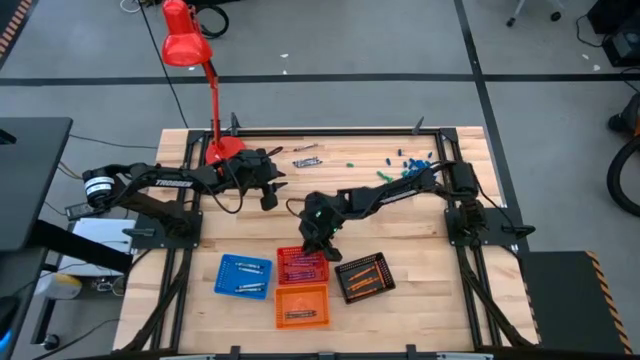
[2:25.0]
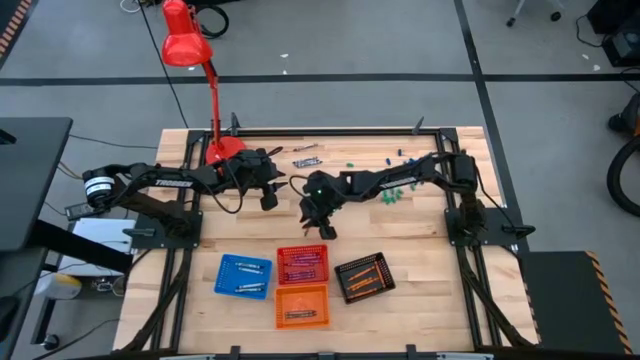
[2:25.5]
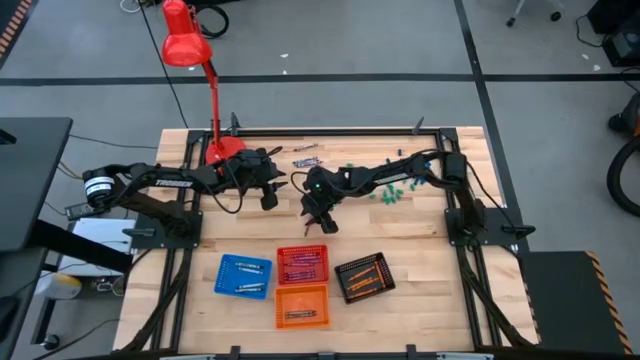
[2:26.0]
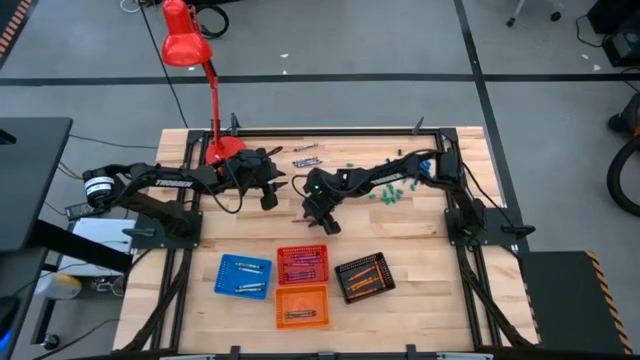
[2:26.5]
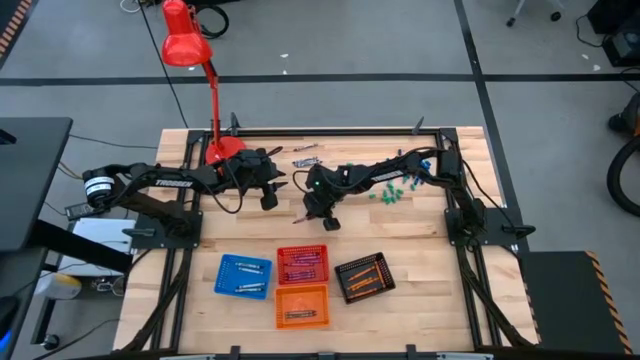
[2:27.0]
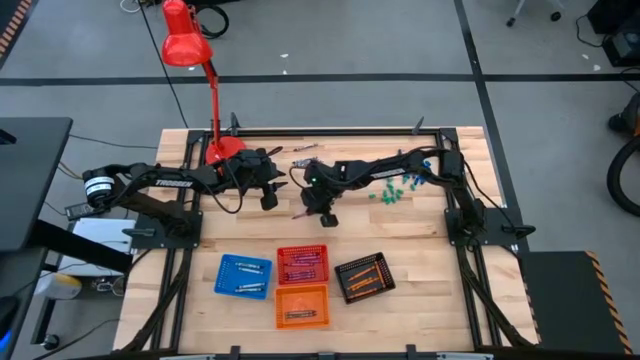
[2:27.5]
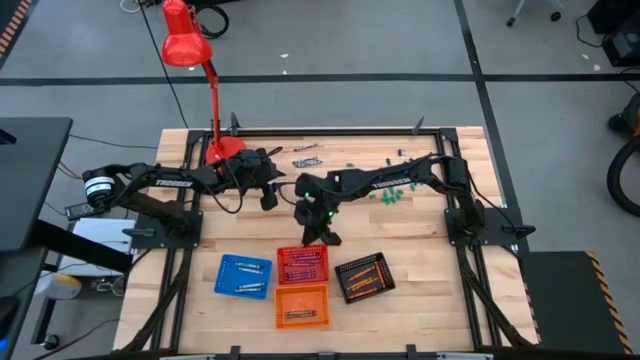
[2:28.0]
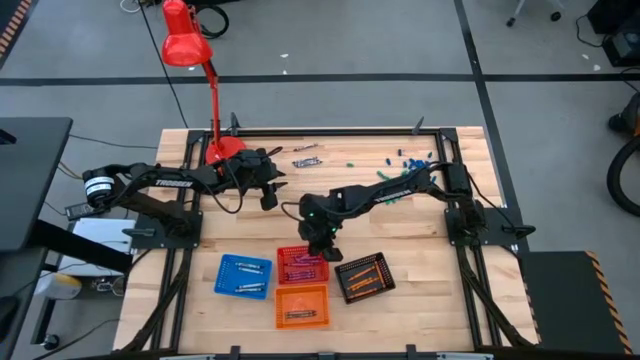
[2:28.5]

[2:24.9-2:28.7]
Task: Sort crayons
Put the violet crayon into the red bin

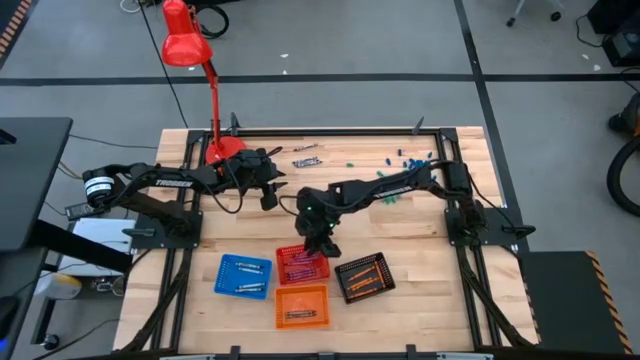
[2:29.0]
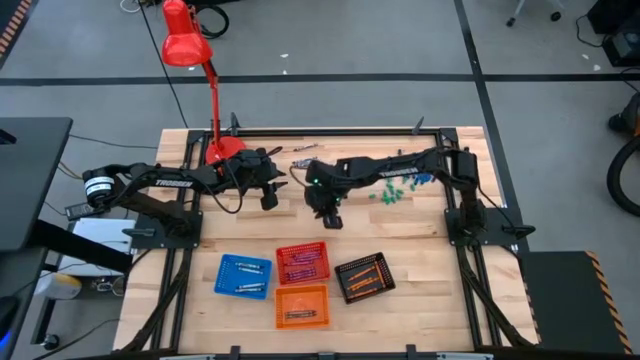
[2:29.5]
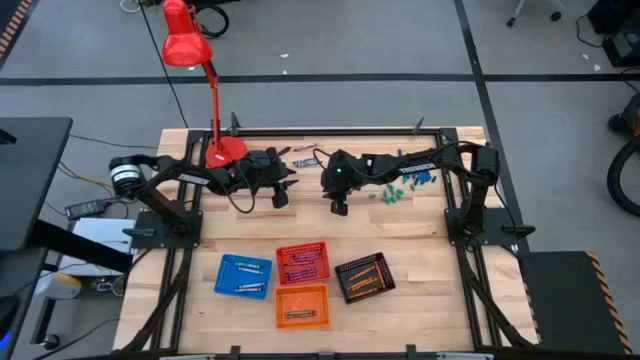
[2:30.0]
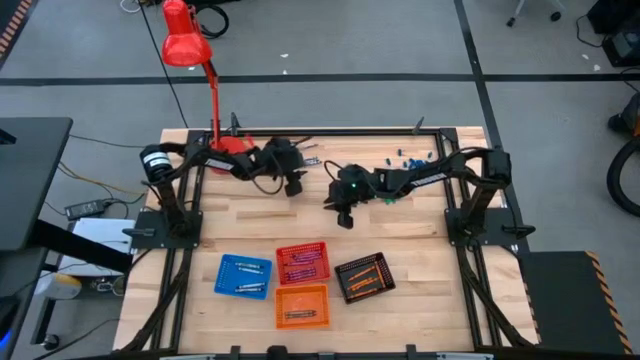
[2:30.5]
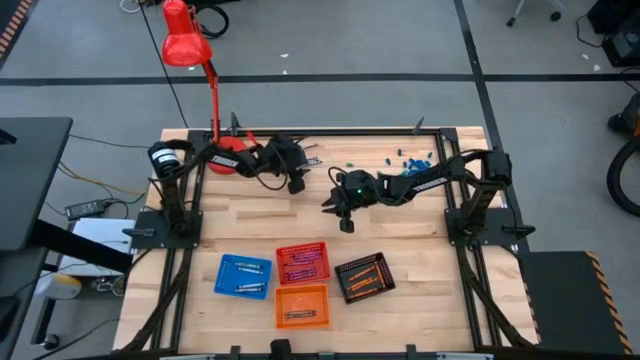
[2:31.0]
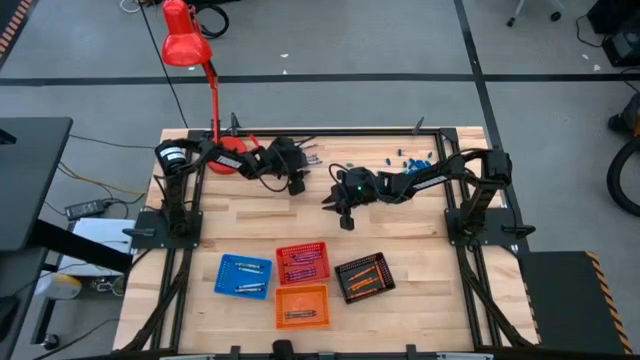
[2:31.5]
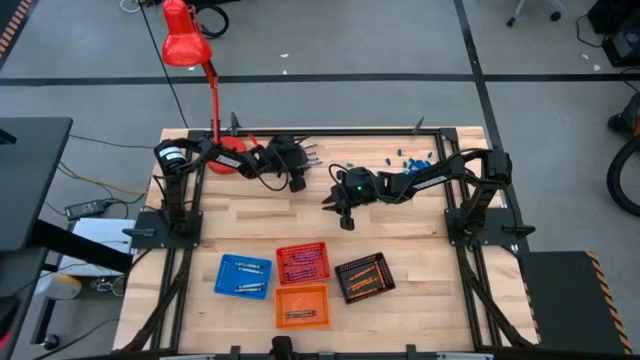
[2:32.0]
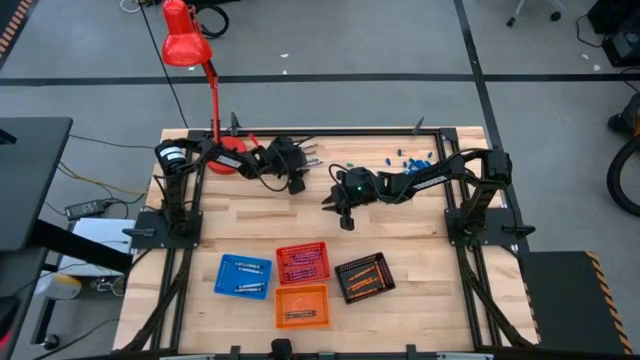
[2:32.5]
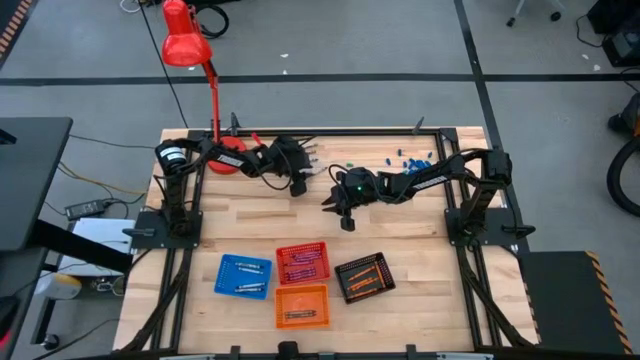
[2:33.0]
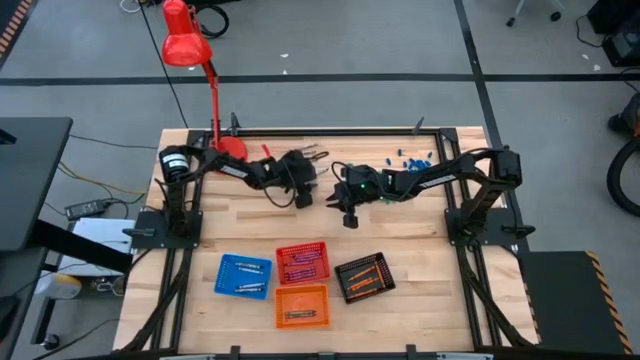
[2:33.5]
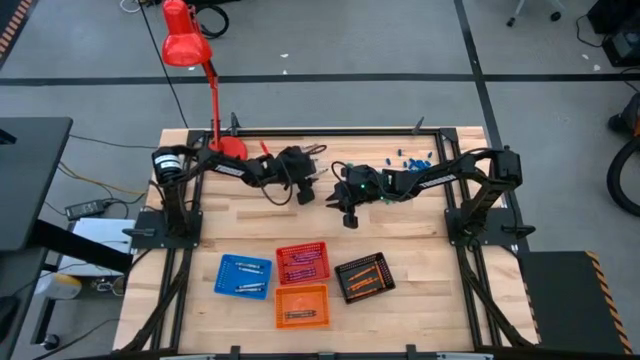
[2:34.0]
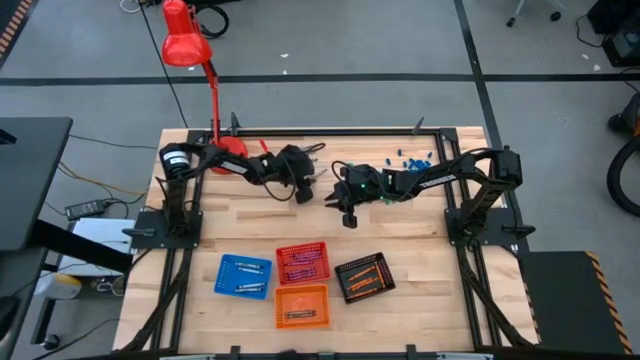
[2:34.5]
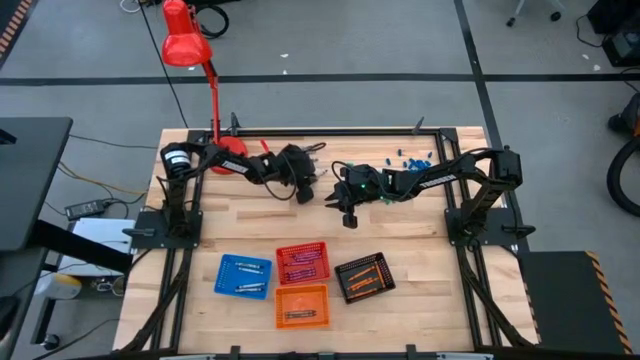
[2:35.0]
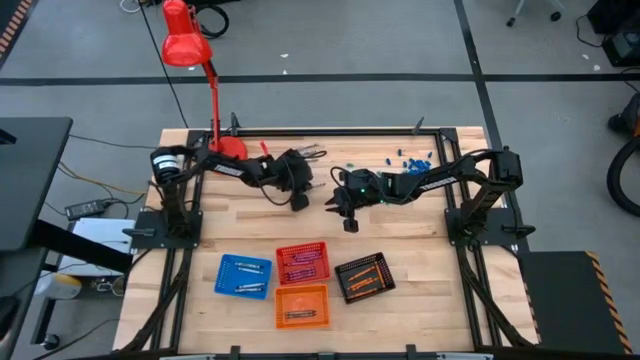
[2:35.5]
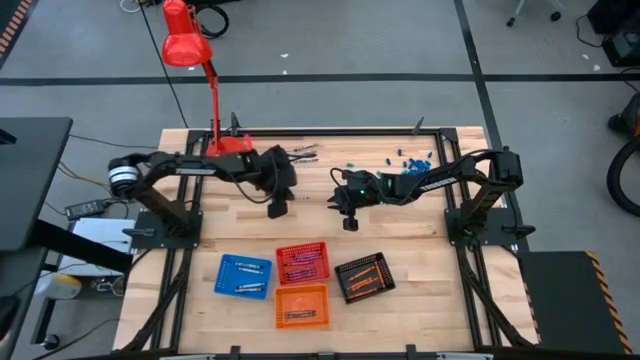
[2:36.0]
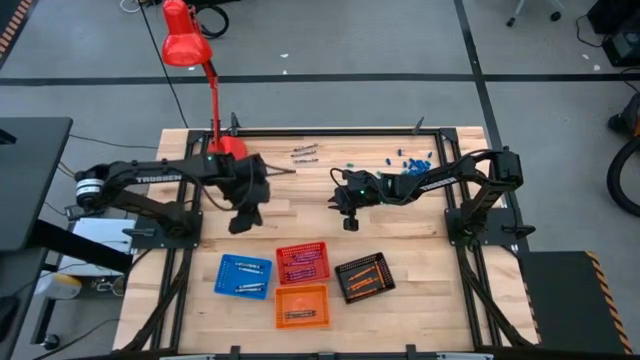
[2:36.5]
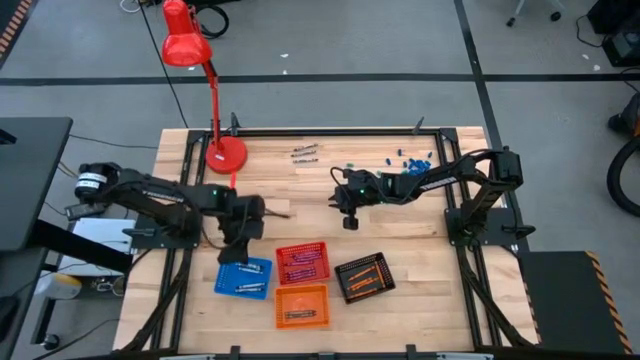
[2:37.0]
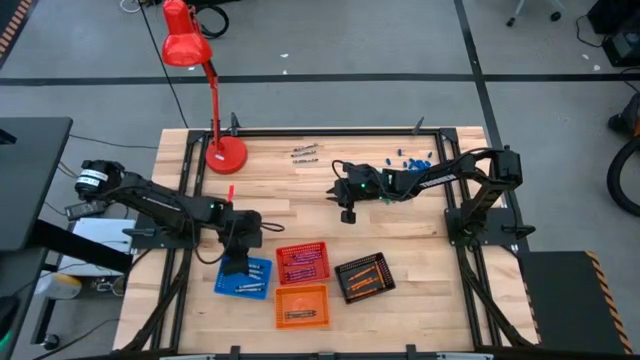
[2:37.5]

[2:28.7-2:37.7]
Put the black crayon into the blue bin

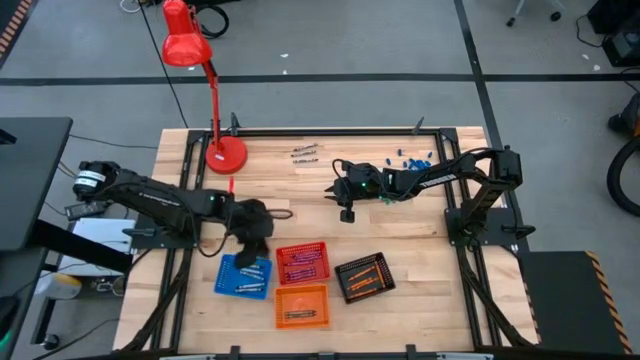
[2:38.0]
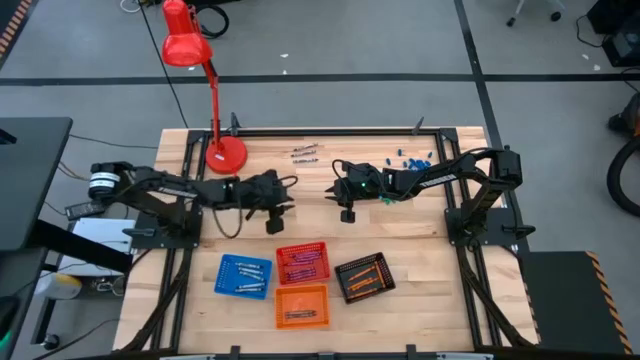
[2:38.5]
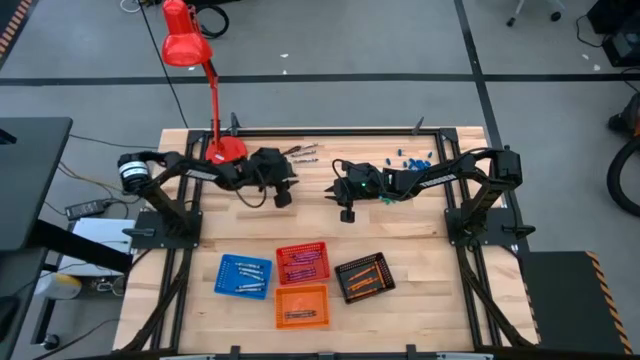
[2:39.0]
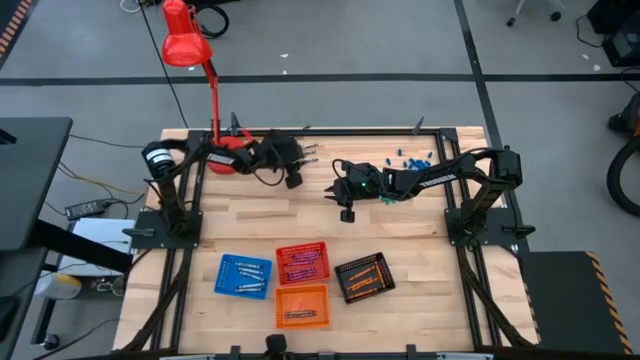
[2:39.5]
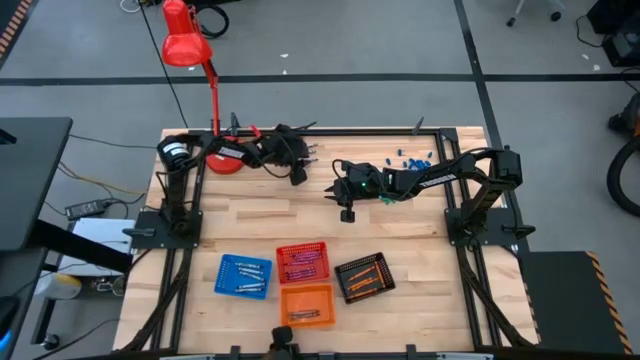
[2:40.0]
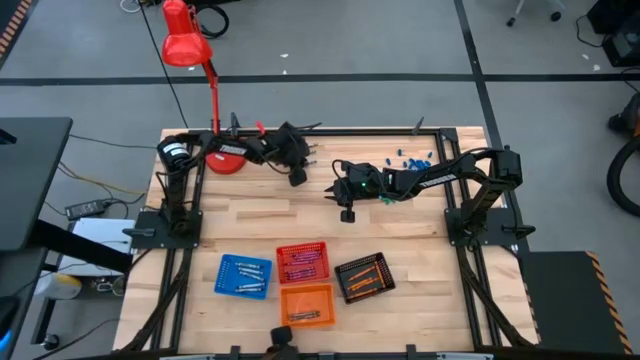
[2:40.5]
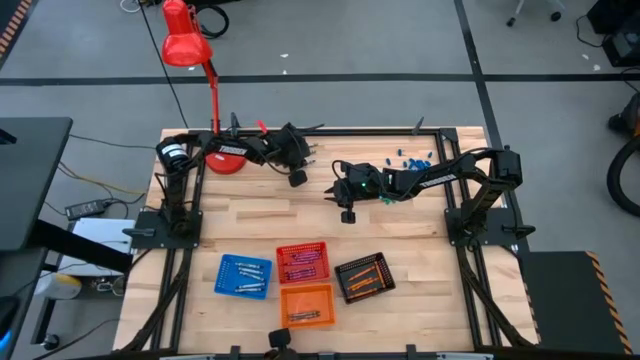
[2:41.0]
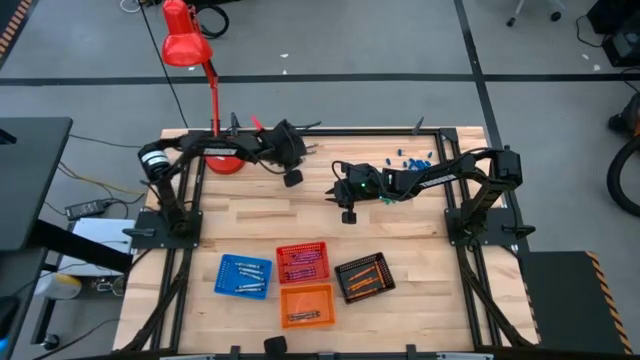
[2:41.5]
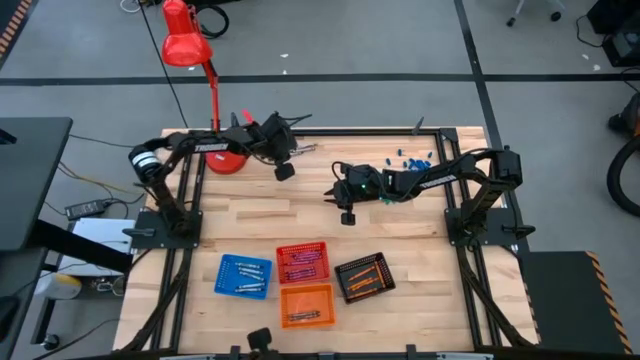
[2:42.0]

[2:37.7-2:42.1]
Put the black crayon into the blue bin

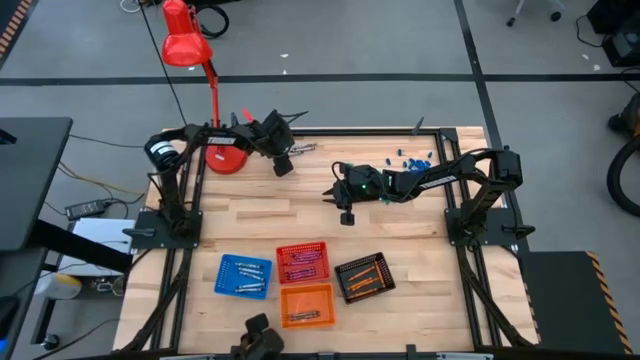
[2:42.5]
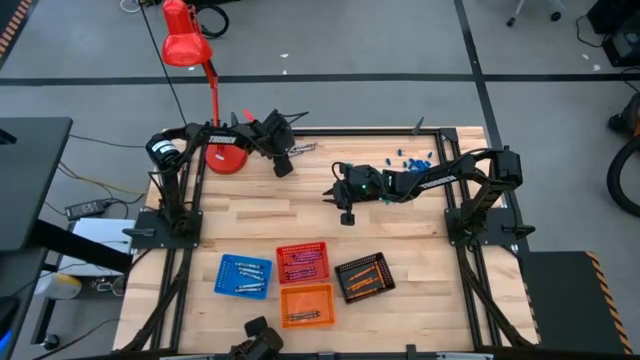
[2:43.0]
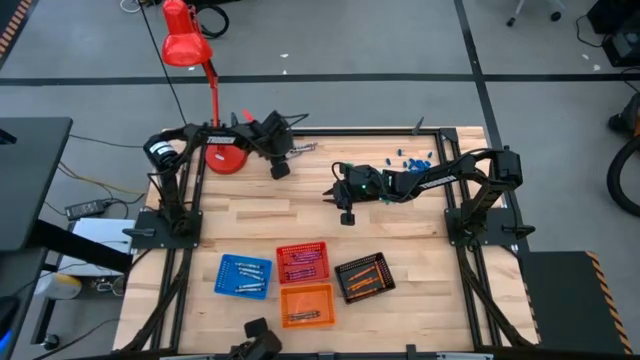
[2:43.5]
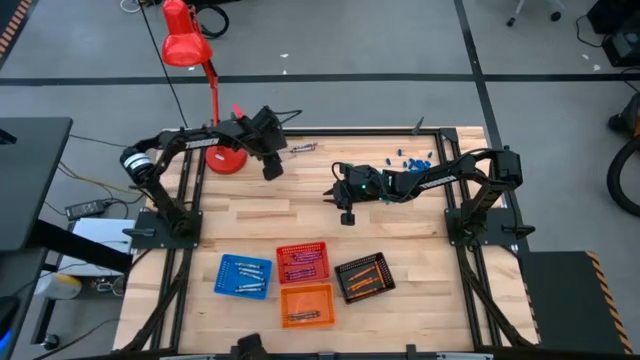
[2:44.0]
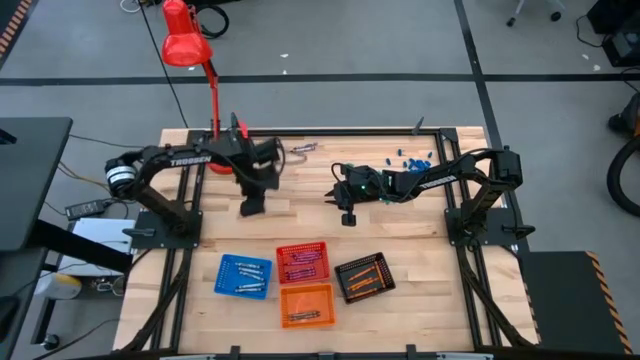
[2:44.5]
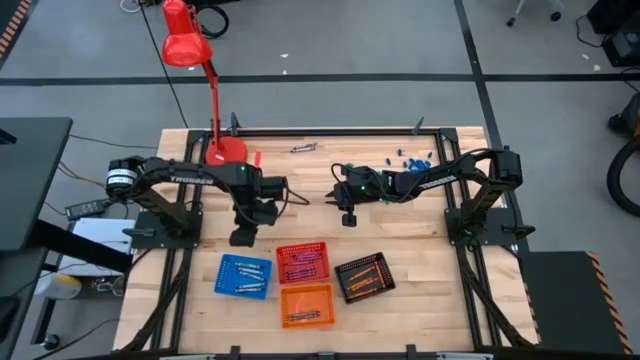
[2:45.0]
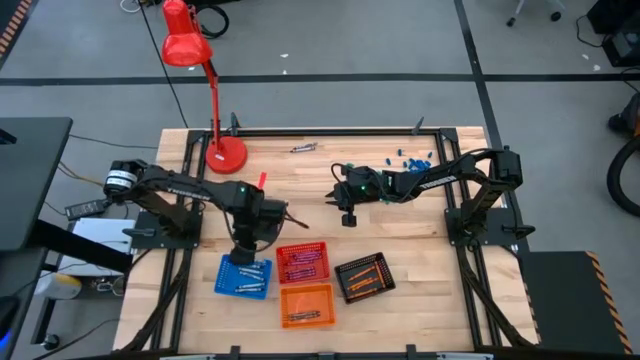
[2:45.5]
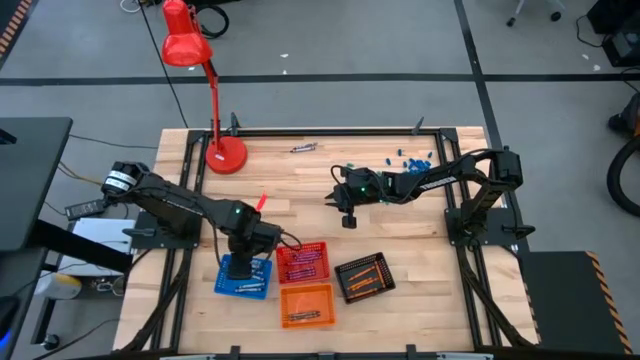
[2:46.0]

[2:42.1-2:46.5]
Put the black crayon into the blue bin
